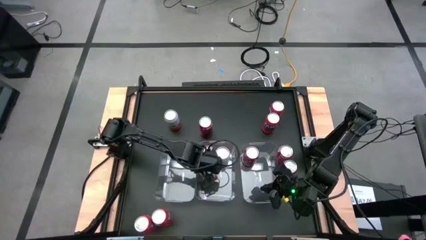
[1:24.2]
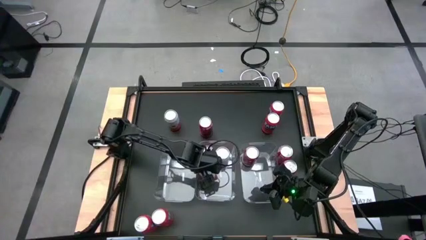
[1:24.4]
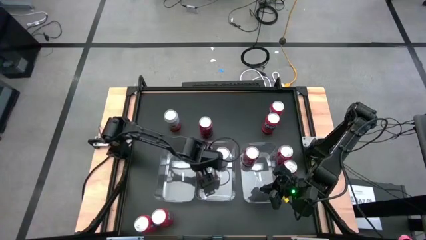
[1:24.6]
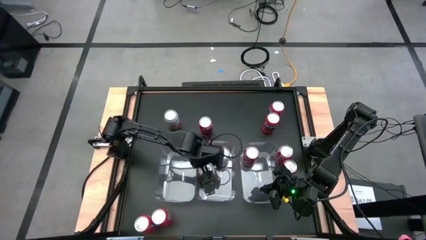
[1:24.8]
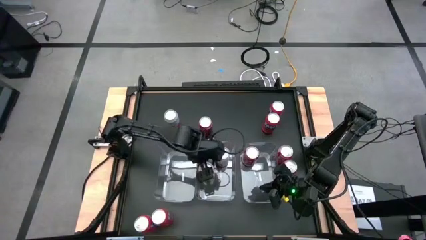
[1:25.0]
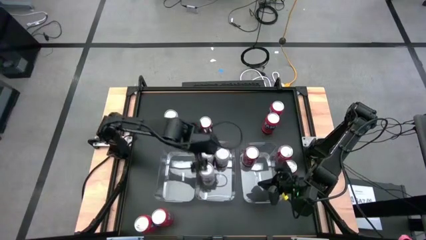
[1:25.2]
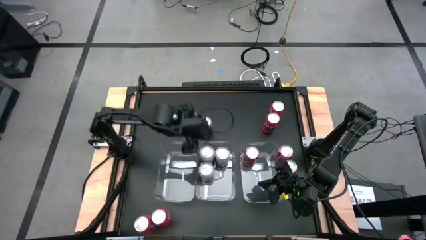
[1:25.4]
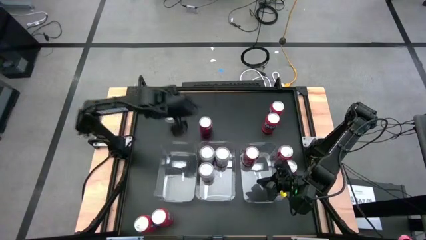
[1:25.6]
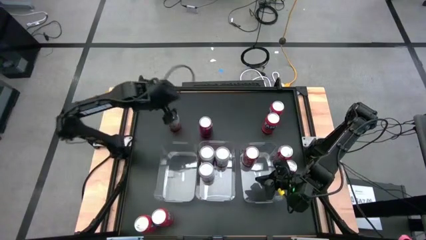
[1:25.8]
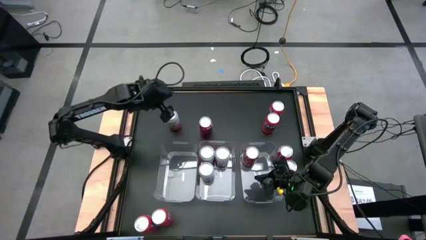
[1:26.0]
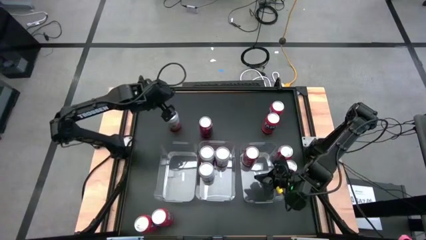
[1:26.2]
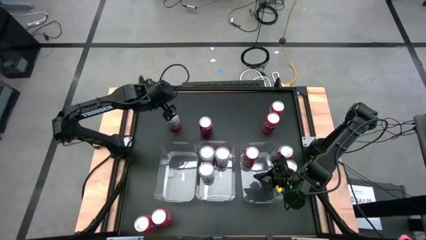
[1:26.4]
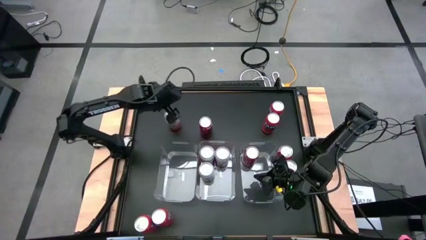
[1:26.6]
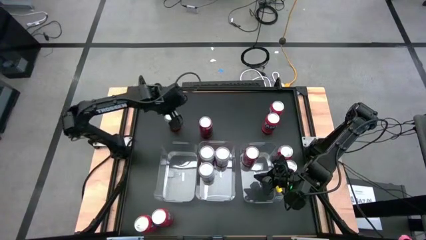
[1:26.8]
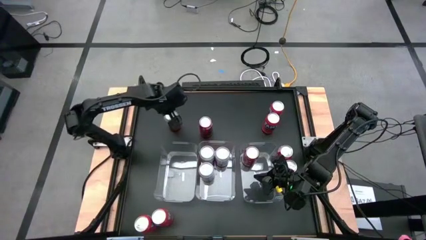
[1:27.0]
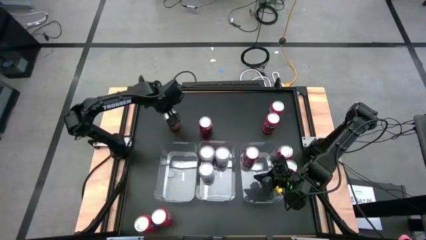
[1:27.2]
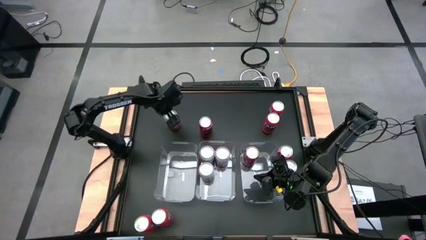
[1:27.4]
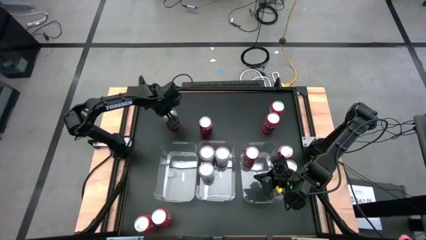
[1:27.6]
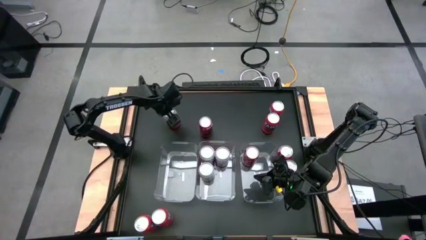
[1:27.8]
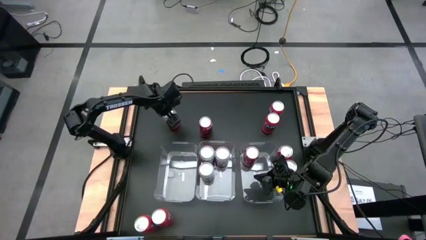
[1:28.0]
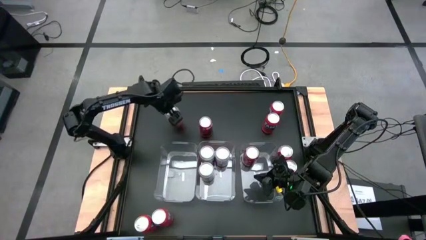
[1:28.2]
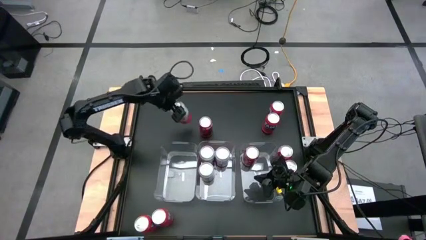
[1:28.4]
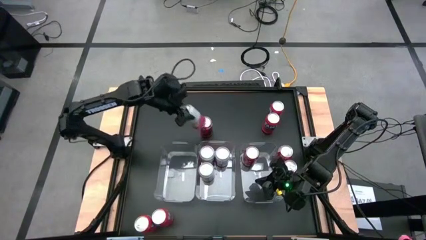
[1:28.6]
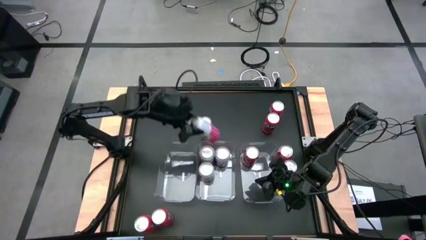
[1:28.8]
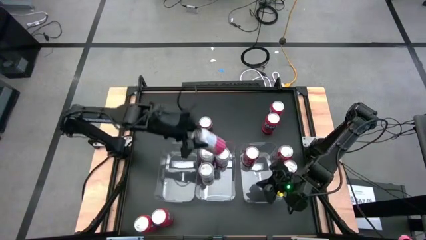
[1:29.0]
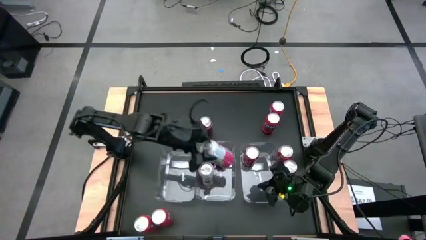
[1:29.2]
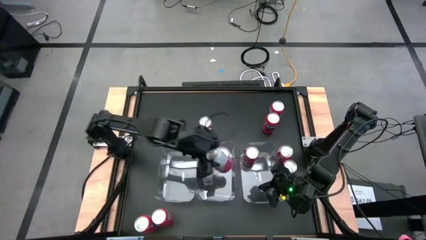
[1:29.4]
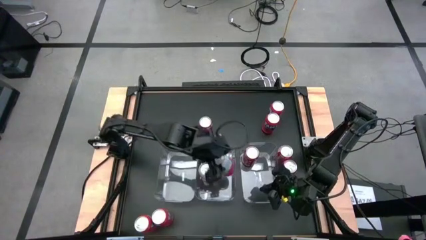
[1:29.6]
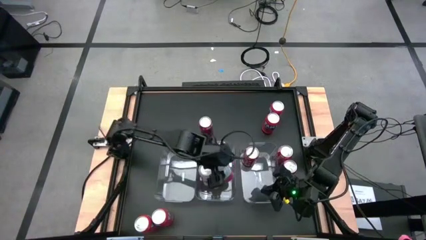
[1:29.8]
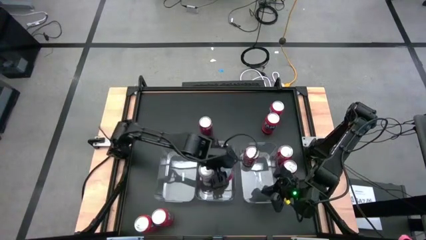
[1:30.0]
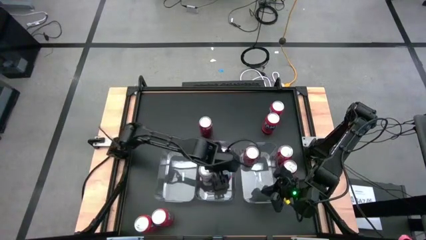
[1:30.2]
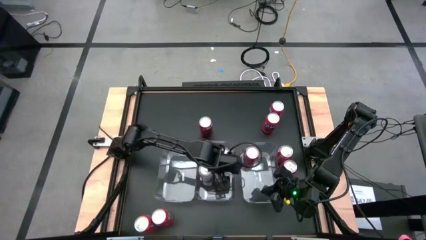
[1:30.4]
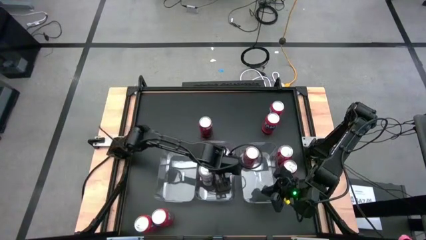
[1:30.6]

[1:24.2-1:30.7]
Task: Sort soda cans
Put the pink-white soda can into the center transparent bin

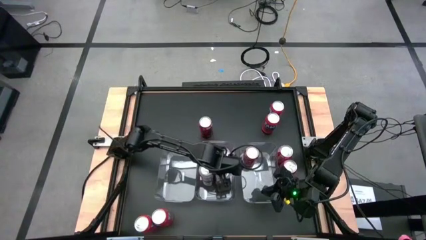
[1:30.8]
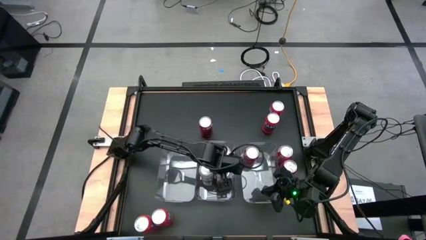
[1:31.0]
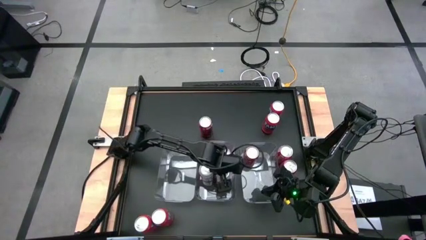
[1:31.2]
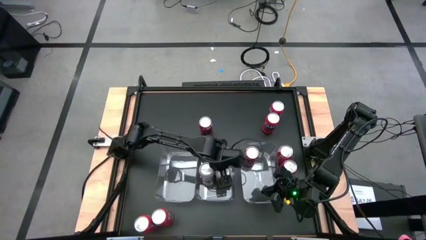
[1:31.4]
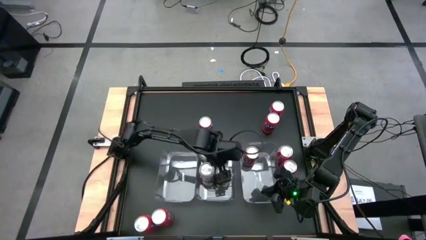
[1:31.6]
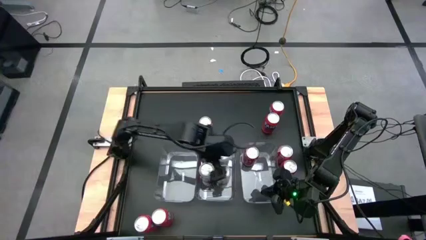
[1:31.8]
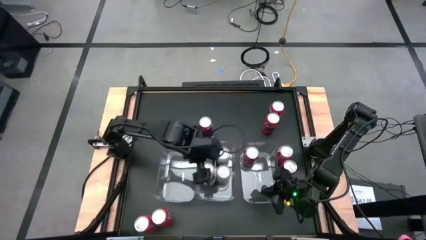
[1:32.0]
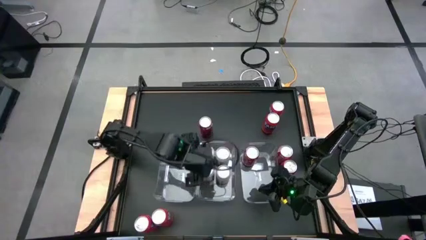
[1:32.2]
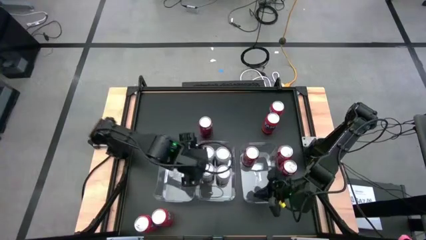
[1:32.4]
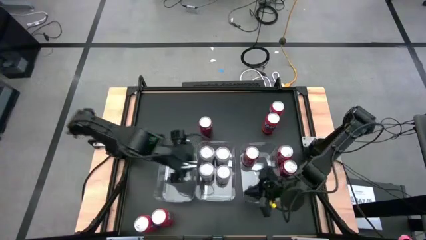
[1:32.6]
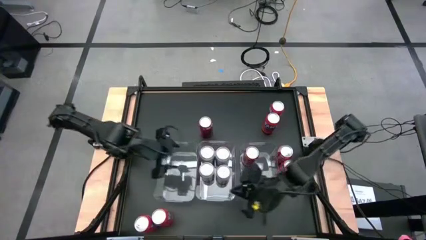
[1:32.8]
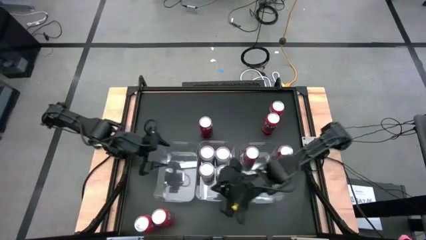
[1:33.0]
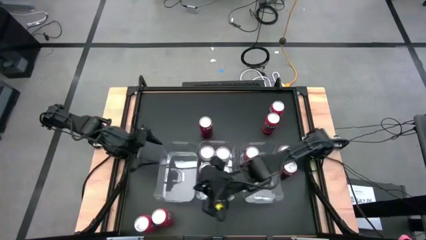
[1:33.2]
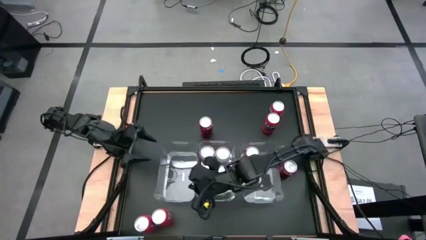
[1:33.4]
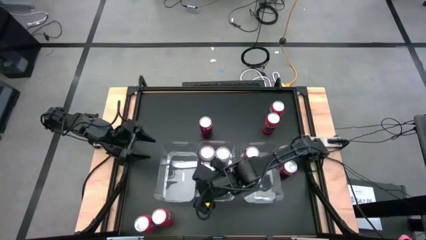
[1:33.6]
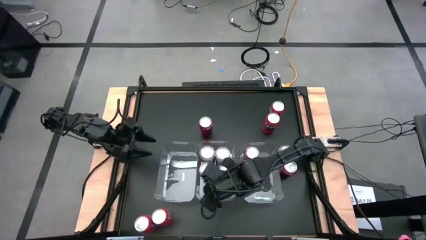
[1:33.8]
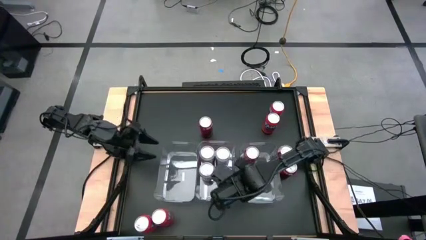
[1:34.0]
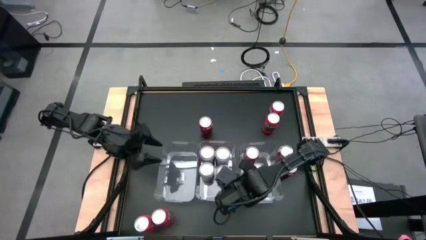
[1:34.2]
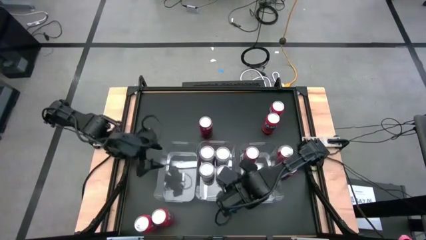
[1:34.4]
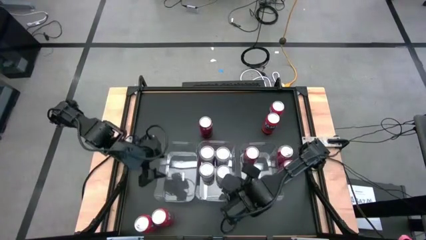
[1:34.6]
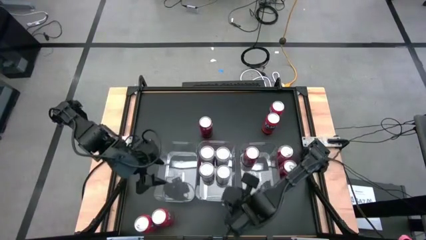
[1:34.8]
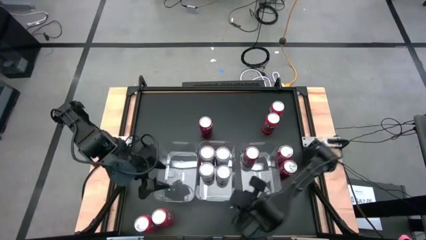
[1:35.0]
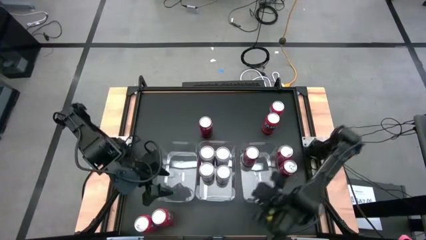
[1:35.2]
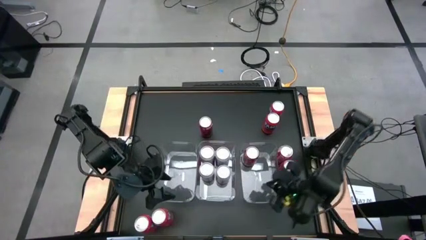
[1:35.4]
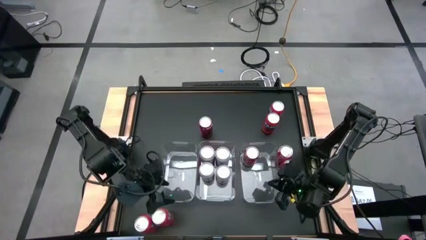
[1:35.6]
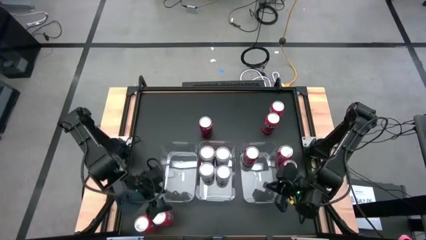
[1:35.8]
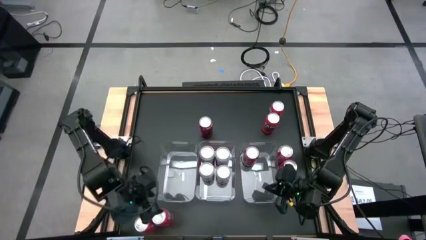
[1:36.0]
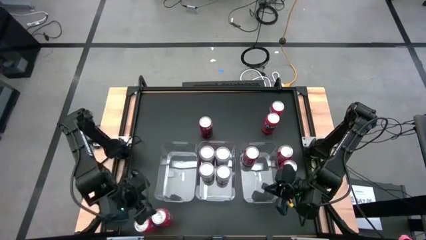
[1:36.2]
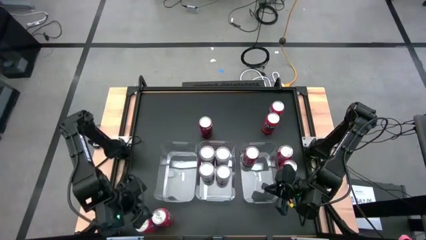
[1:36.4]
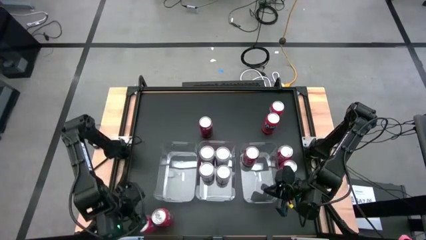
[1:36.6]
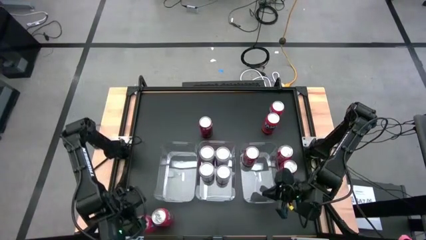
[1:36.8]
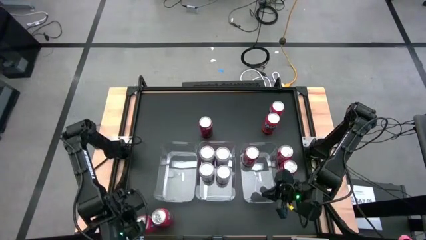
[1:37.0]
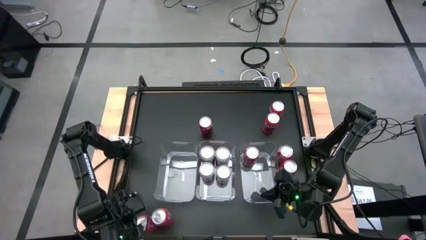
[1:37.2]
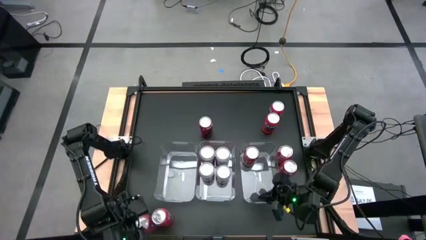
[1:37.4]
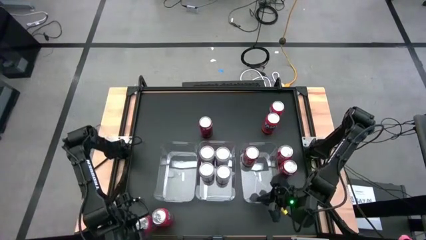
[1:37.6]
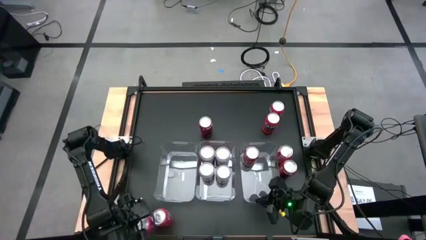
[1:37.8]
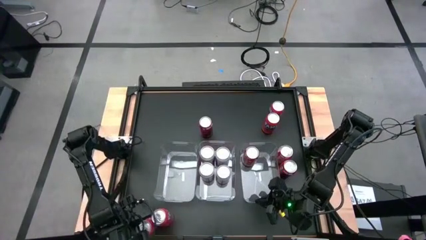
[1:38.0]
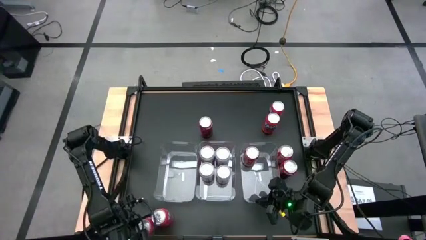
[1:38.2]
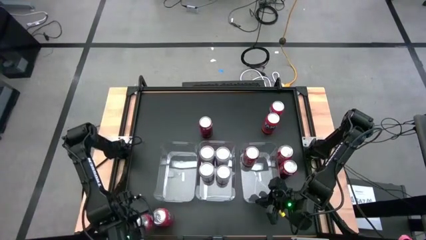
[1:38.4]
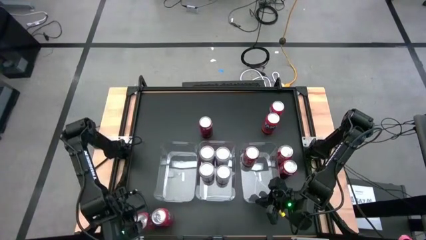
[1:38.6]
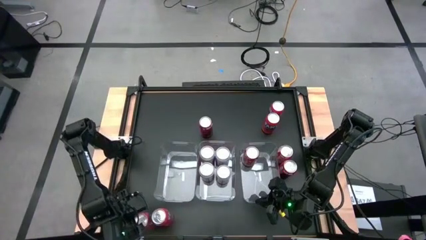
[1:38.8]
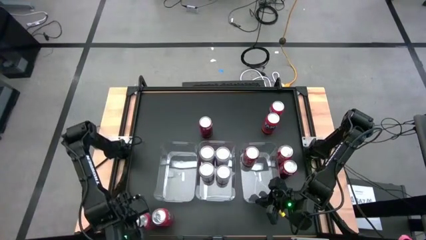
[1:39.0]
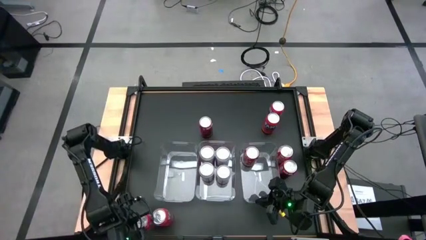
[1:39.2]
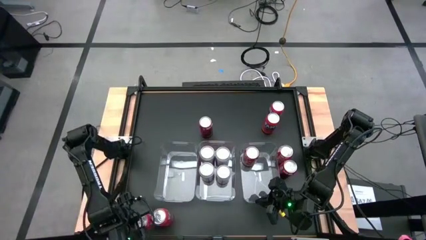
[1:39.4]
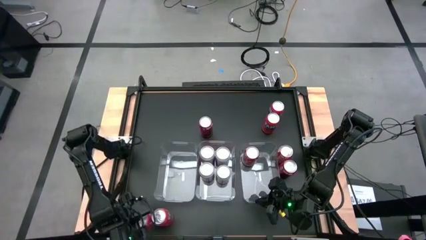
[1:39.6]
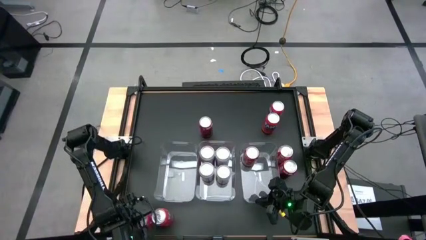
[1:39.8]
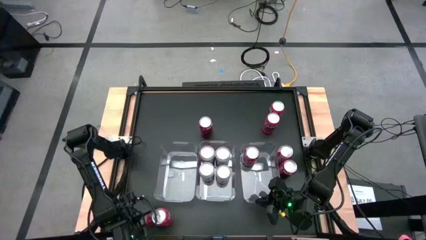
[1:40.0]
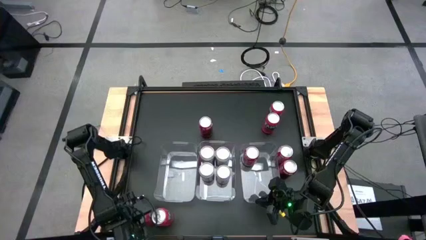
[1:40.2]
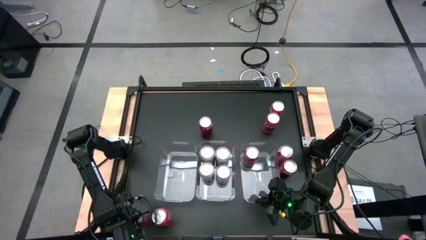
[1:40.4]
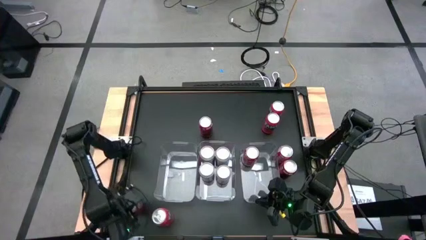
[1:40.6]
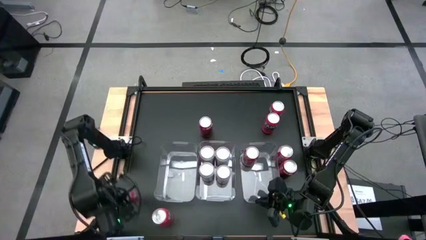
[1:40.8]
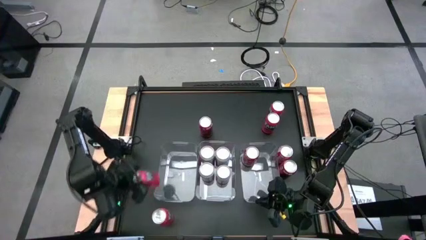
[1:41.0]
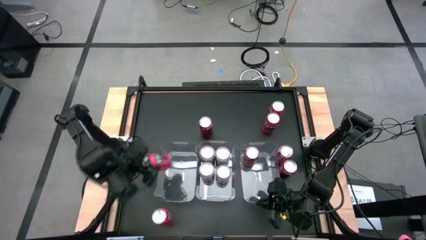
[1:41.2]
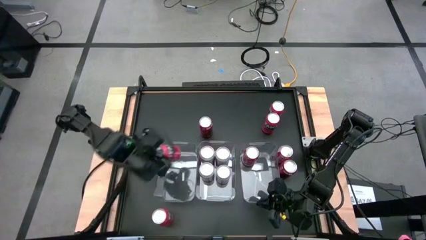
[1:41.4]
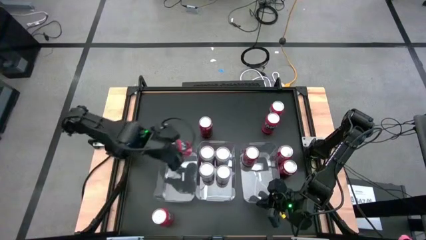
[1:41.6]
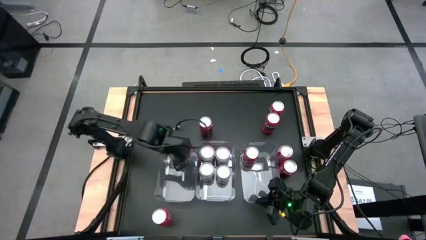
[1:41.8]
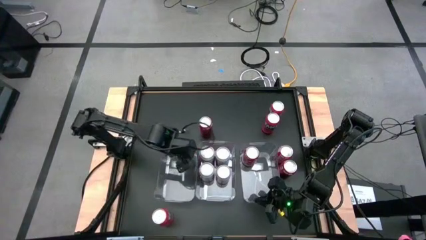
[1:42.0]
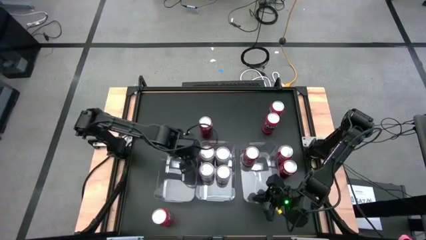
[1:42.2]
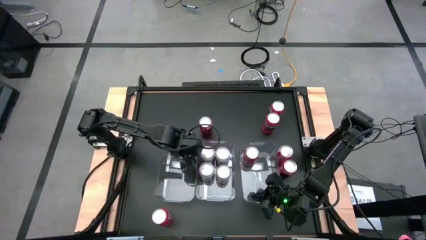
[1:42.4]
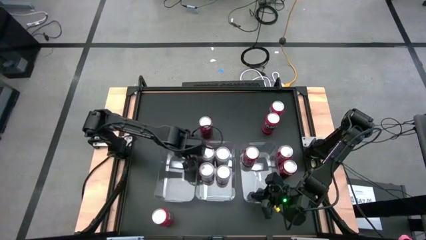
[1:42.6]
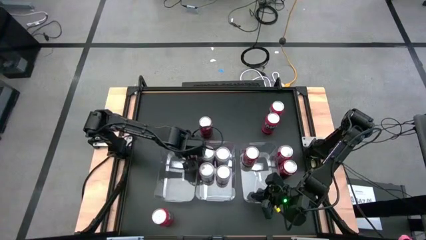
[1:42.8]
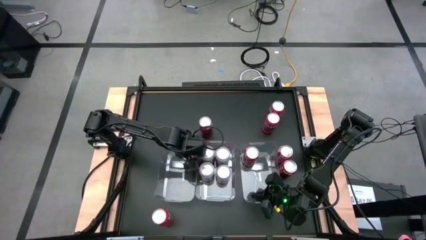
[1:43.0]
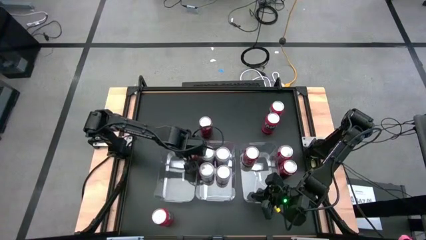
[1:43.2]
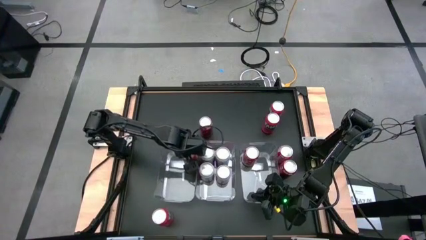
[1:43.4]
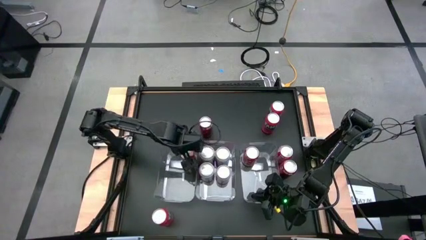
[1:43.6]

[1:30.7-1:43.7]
Put the orange soda can into the left transparent bin
